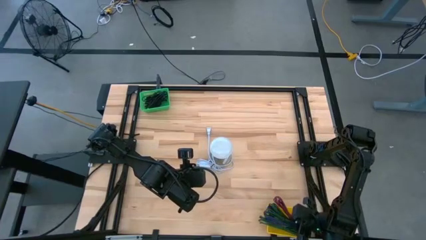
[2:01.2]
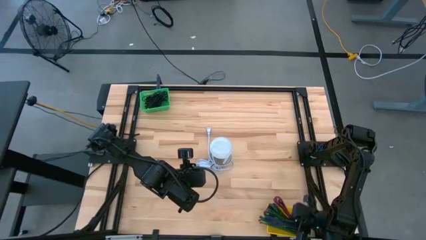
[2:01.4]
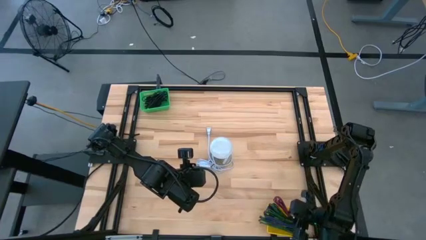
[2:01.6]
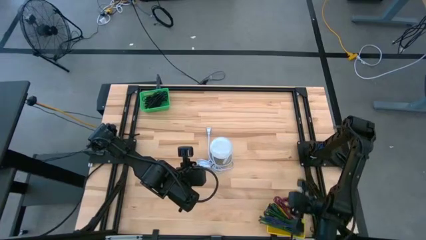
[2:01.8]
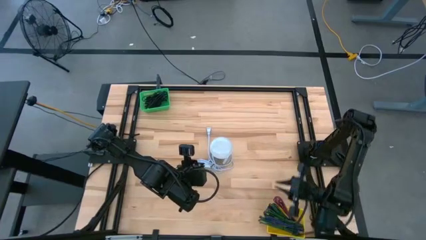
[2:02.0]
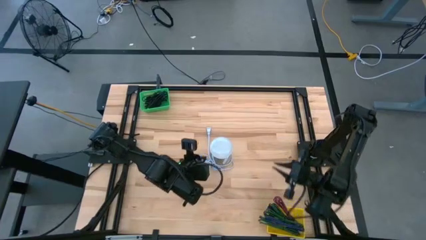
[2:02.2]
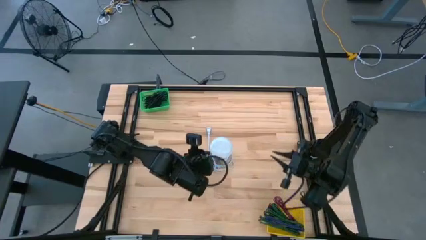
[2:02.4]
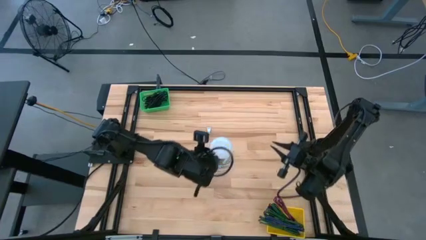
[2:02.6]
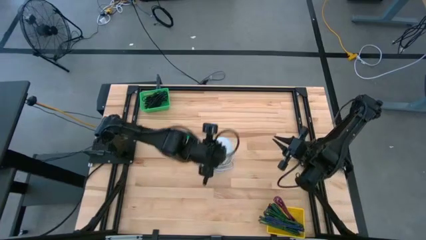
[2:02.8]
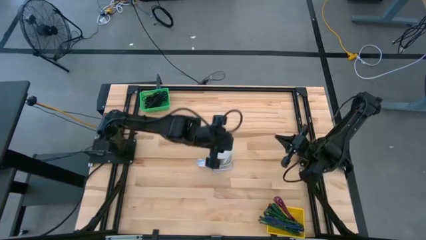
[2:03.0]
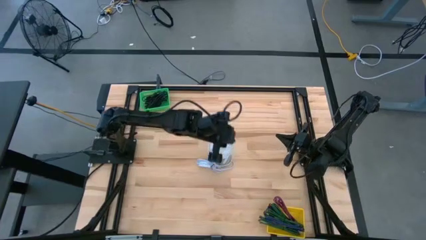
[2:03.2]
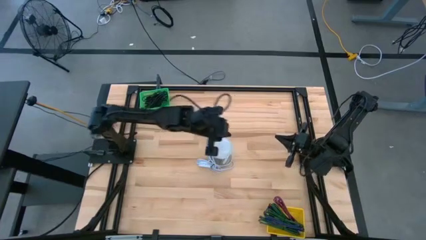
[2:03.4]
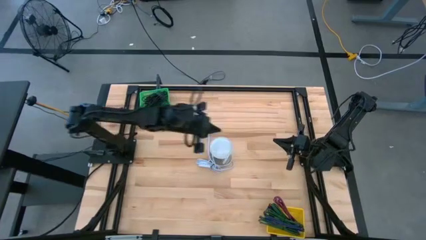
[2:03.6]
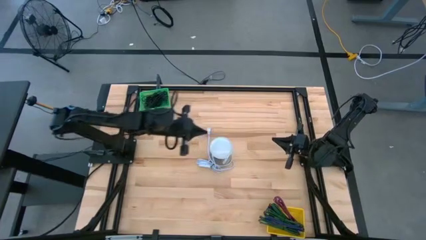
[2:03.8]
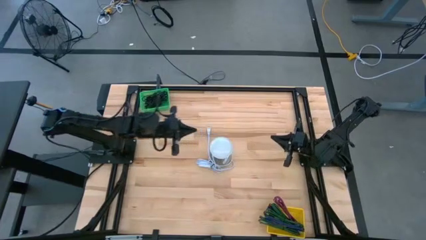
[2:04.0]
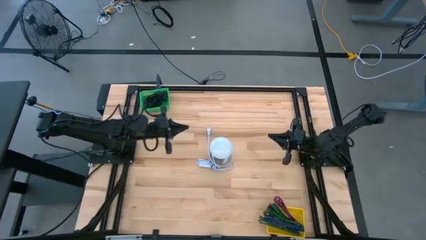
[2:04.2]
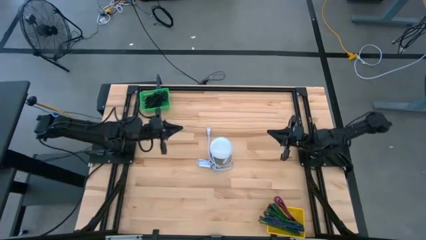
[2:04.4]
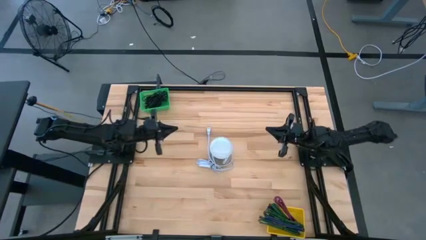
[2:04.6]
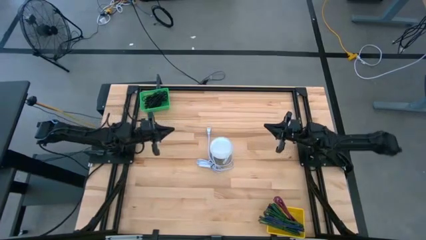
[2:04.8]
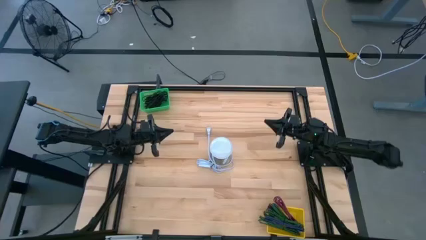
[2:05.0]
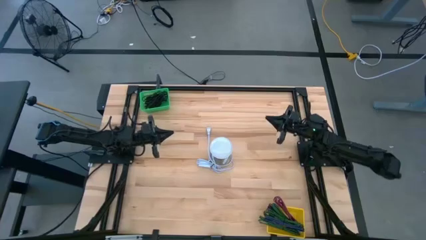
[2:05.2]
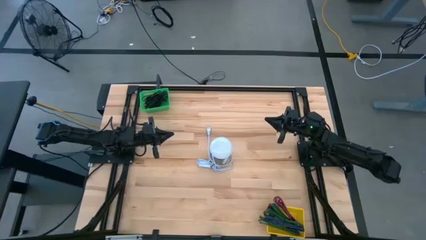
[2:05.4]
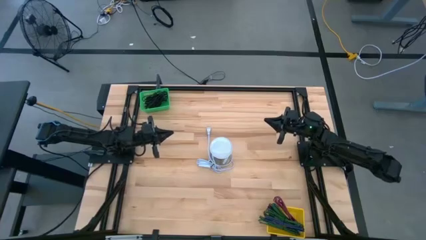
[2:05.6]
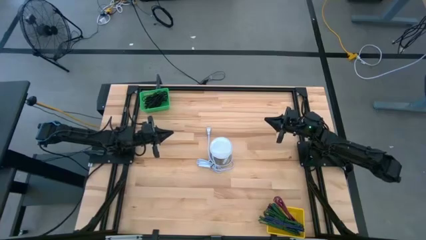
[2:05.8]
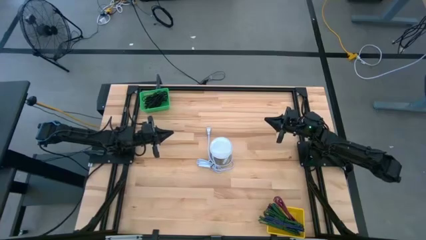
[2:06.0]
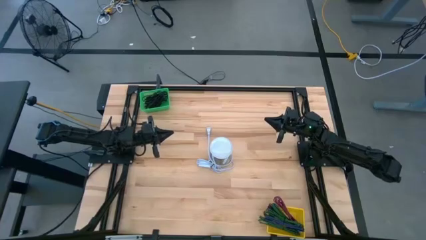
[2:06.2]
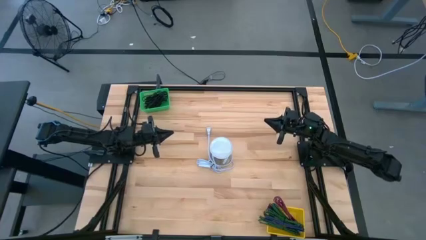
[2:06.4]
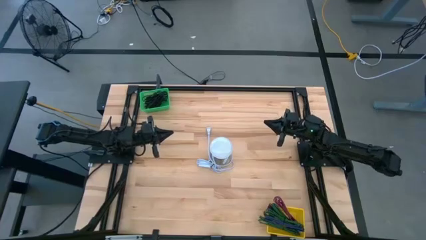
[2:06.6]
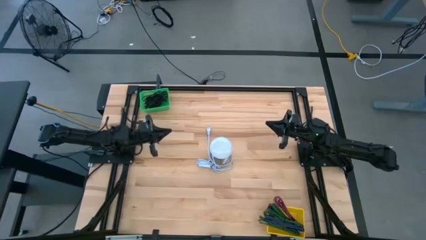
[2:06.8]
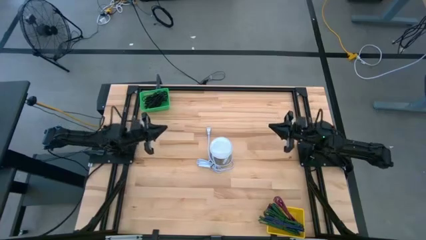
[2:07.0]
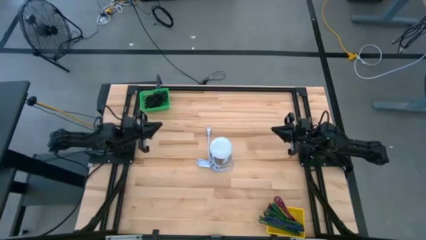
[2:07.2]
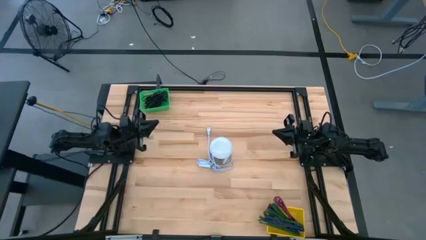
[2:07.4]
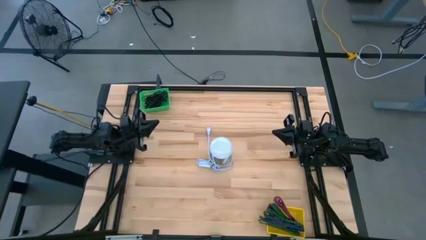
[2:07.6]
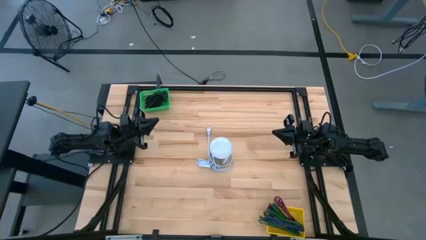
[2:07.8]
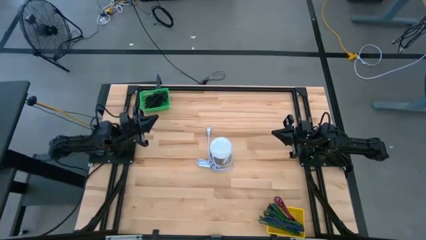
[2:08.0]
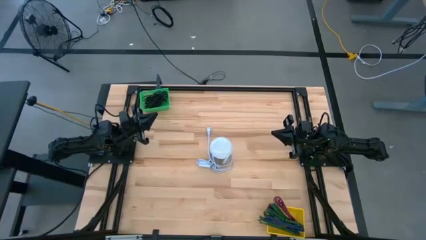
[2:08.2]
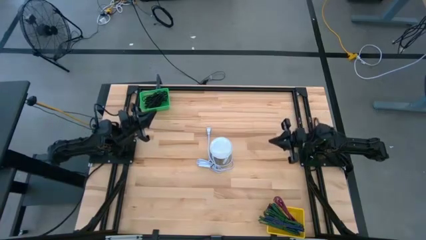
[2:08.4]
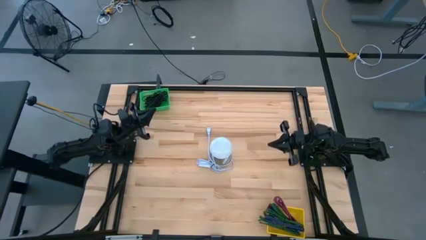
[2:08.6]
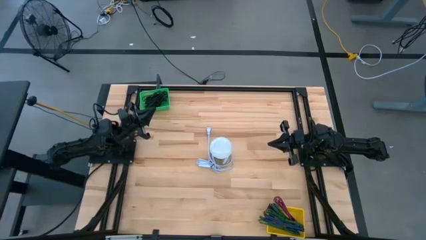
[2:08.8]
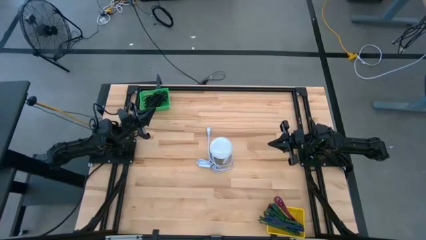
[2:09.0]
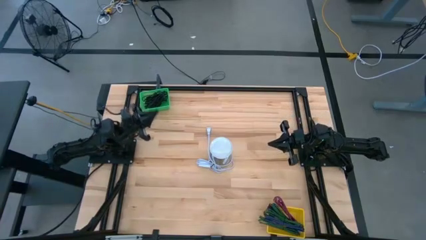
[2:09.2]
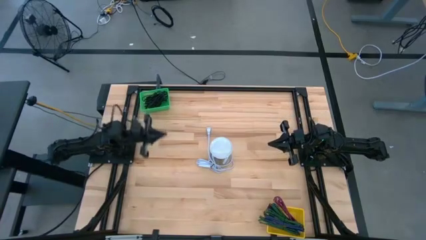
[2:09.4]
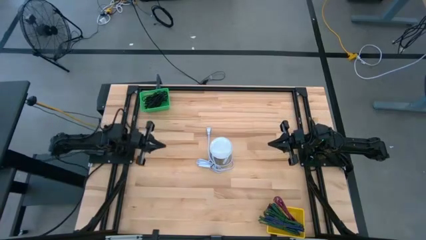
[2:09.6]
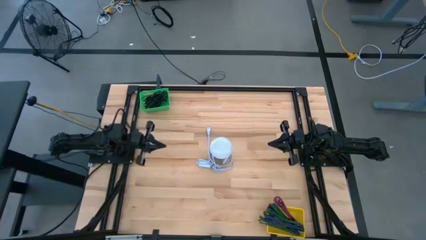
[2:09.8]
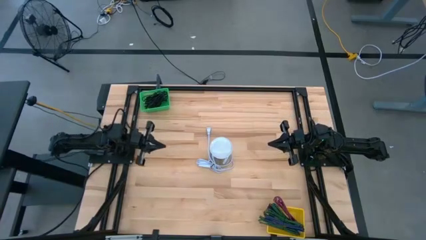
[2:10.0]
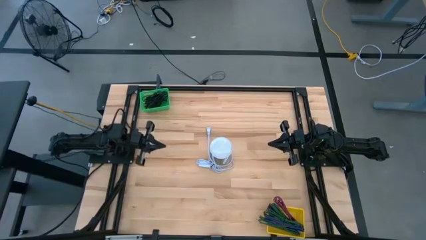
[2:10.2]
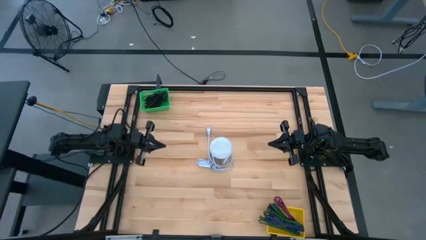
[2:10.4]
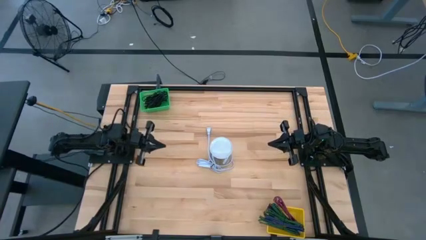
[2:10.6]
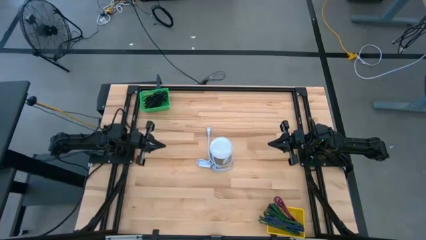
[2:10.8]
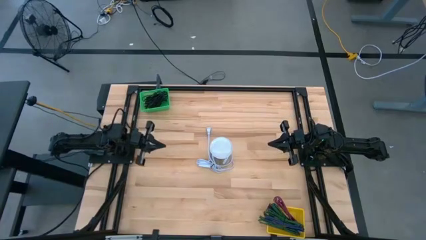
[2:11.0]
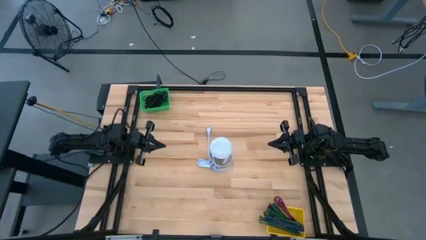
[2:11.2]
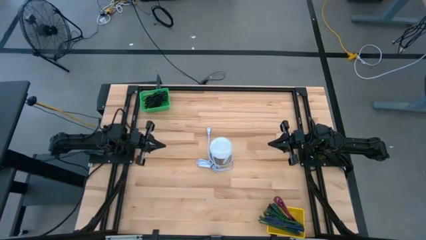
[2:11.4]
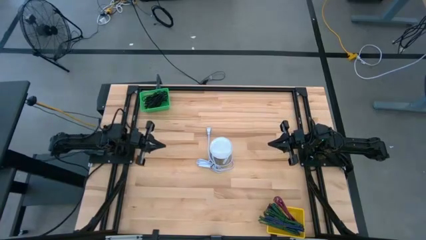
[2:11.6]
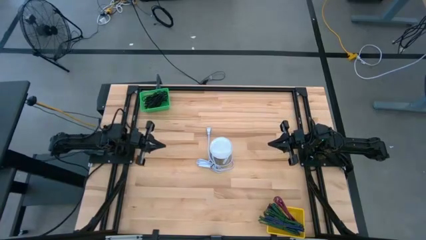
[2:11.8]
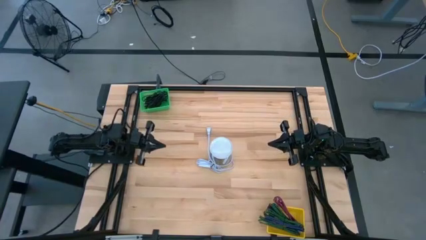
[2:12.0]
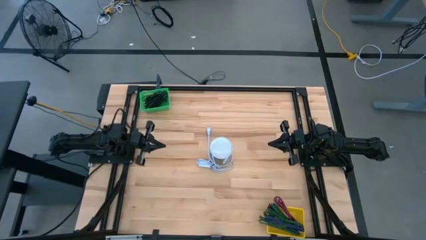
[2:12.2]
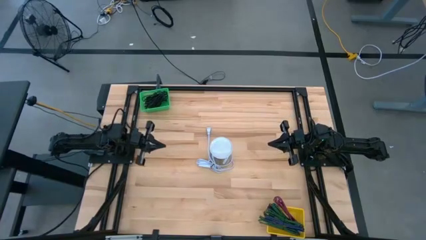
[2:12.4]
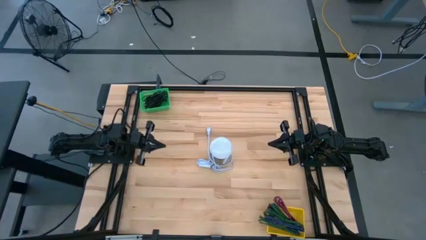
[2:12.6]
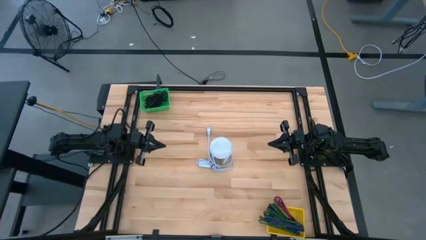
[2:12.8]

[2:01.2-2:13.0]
Task: Pick & Place USB Port
Return to Home Position

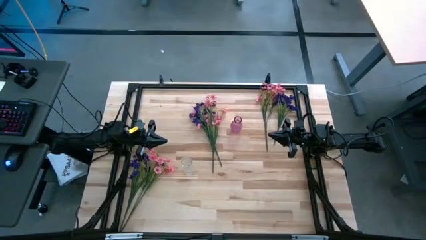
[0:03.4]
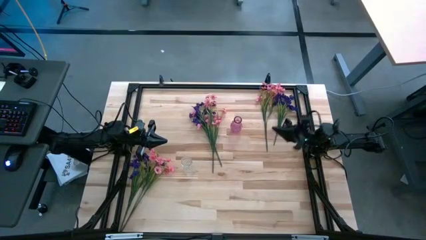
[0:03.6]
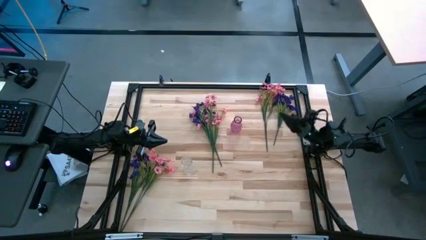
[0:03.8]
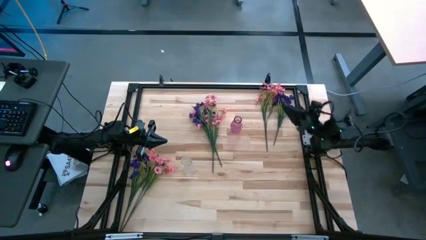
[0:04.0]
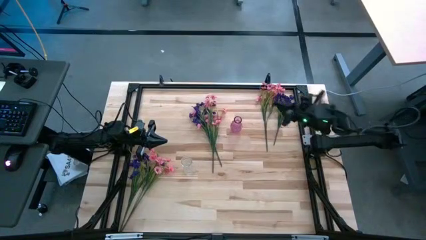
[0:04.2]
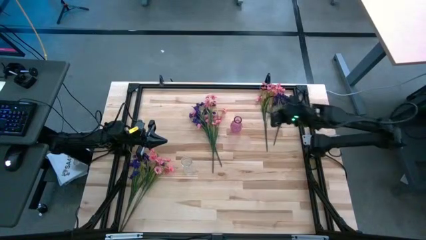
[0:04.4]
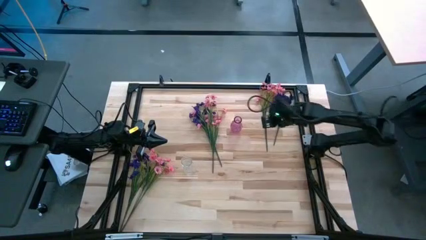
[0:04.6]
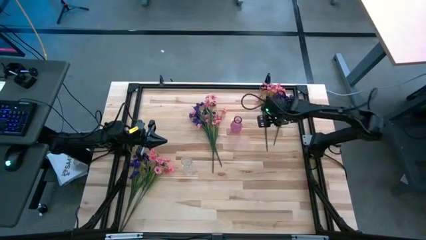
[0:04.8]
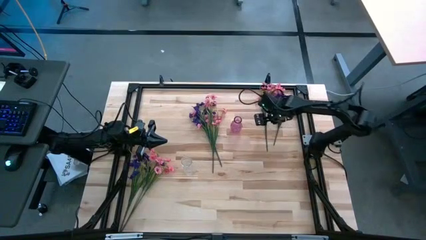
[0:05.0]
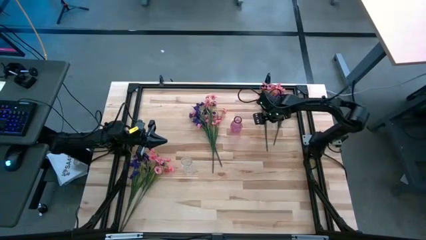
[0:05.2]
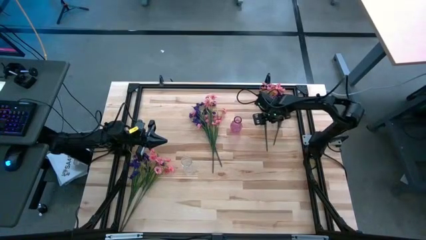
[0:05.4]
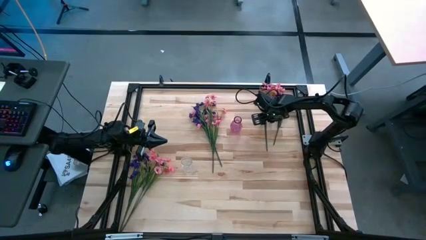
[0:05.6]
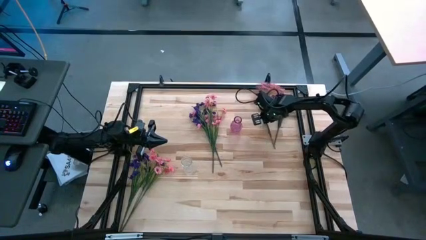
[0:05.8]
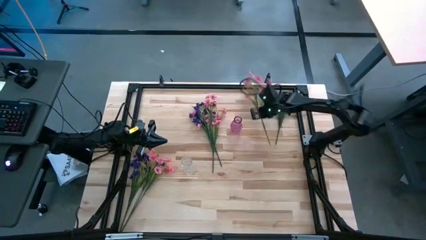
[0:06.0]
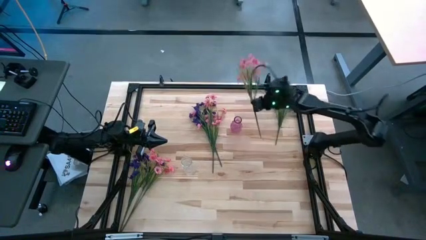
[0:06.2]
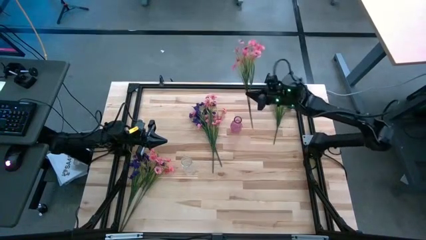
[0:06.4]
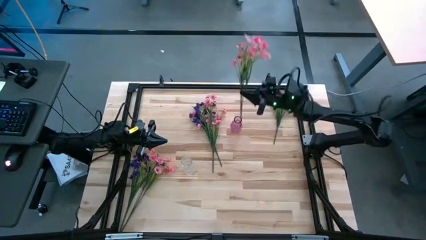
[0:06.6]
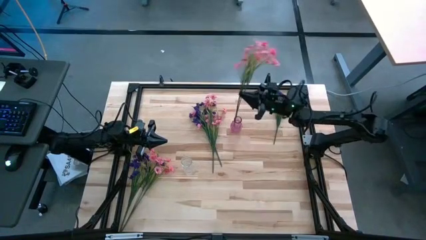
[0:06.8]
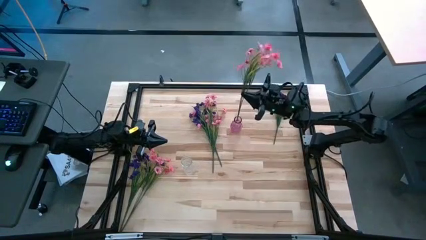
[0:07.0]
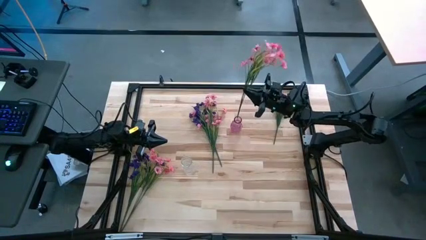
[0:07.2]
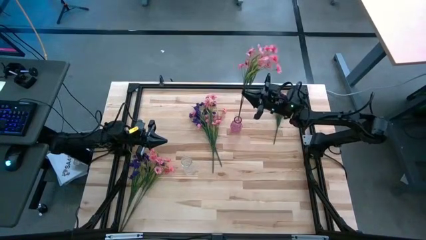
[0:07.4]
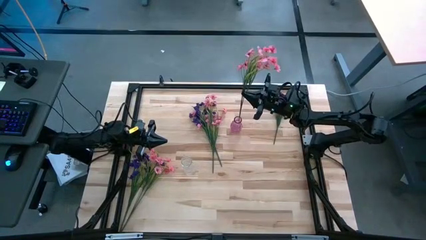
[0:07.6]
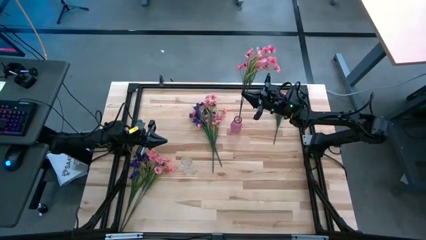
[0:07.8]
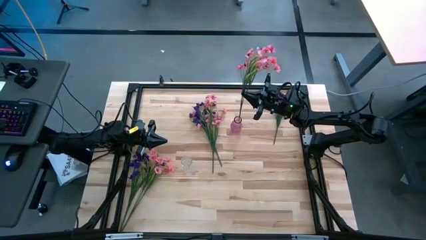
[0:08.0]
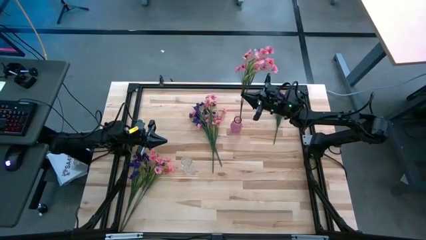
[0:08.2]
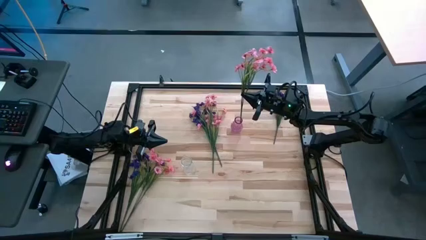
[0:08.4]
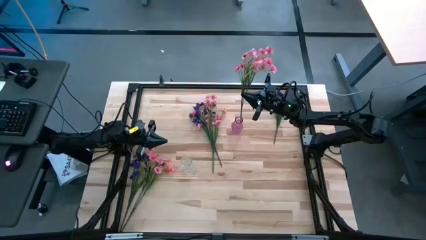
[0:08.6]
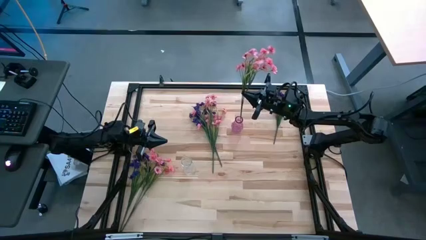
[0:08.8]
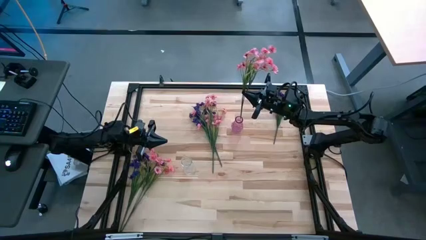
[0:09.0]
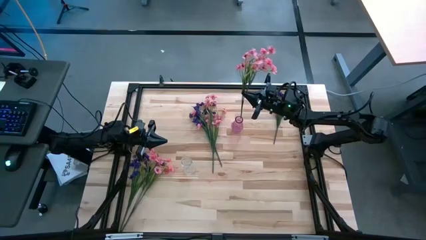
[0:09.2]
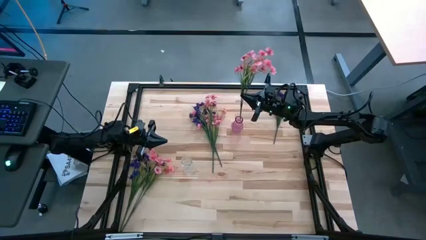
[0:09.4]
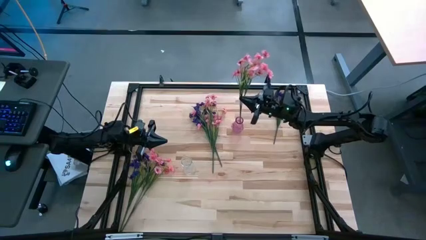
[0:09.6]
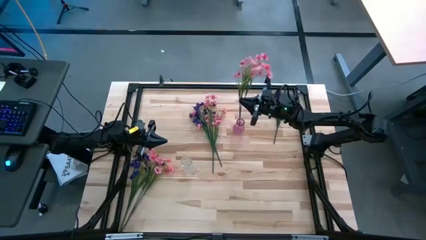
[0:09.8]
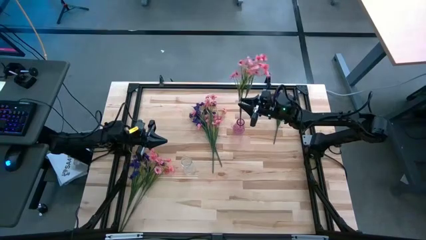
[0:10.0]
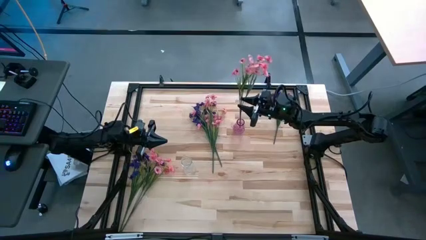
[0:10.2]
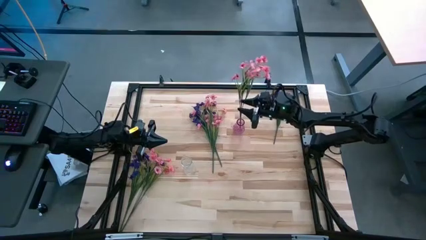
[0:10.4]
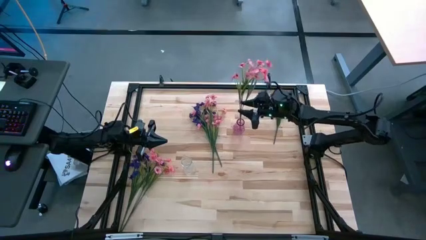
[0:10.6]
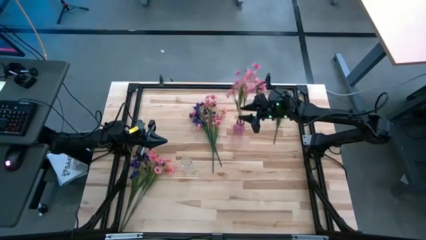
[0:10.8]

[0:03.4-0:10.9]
Task: Sort flowers into vase by color
Put the top right pink flowers into the purple vase
